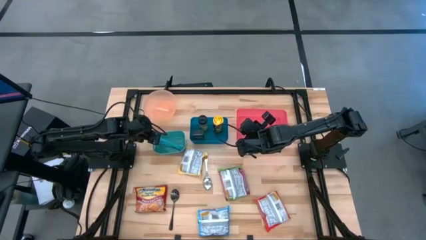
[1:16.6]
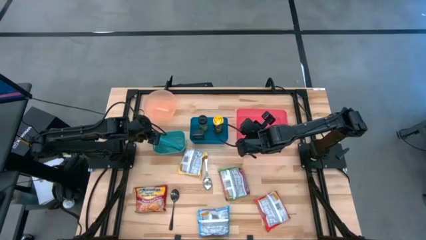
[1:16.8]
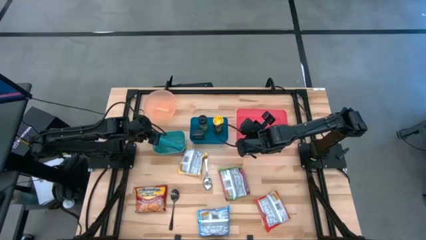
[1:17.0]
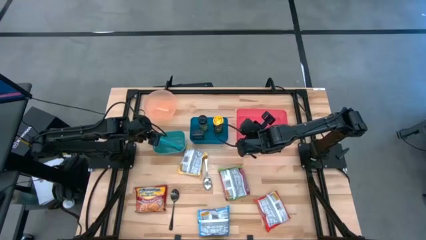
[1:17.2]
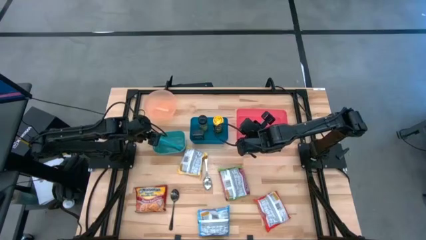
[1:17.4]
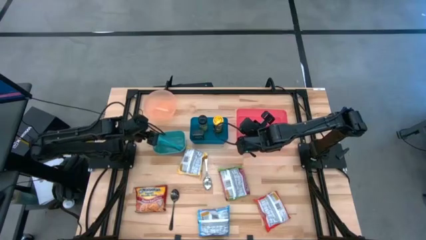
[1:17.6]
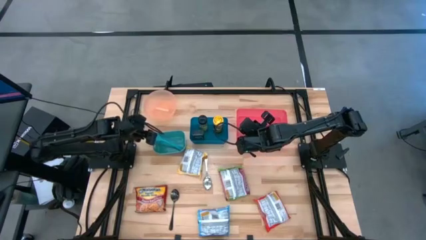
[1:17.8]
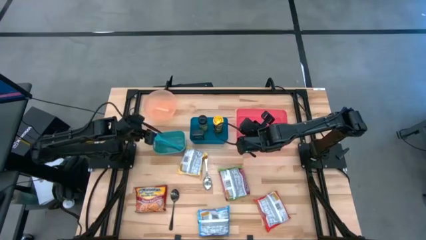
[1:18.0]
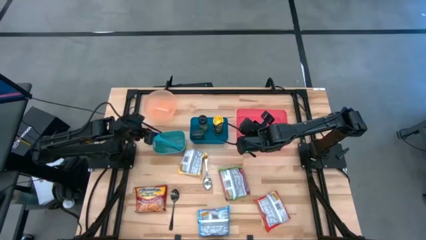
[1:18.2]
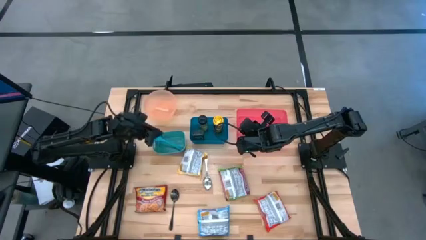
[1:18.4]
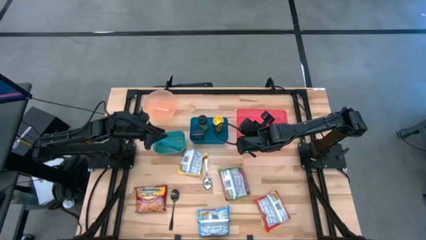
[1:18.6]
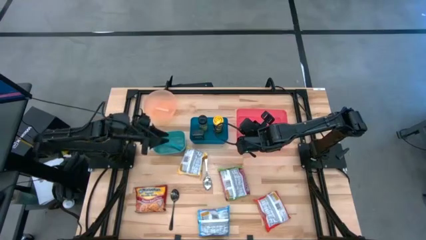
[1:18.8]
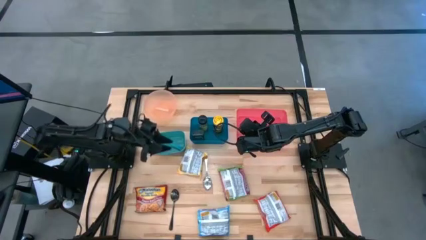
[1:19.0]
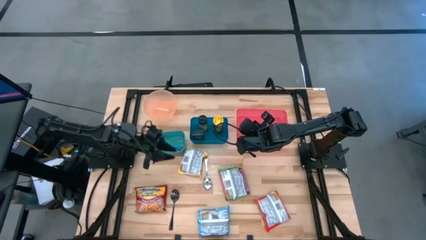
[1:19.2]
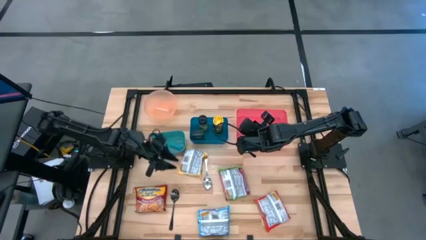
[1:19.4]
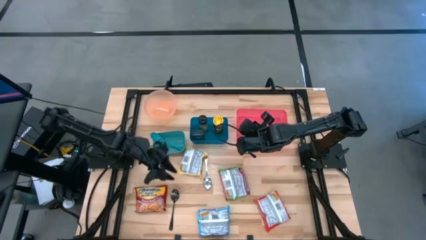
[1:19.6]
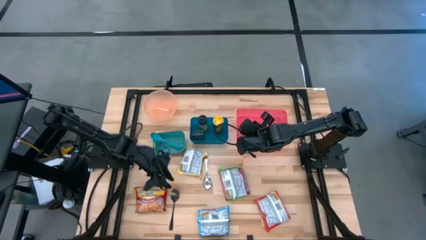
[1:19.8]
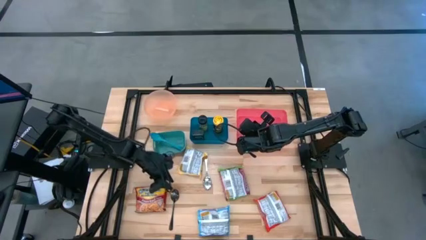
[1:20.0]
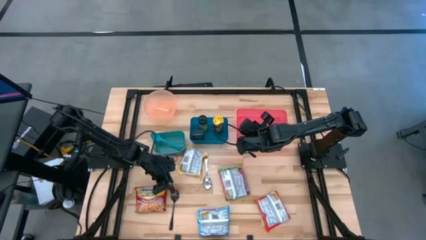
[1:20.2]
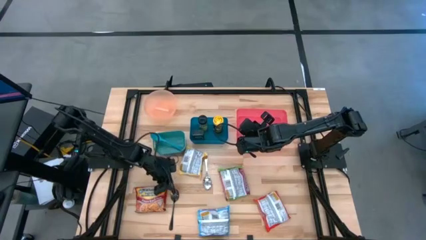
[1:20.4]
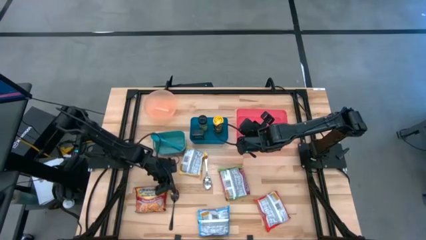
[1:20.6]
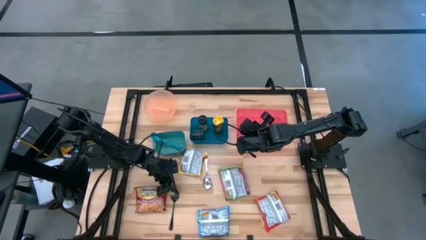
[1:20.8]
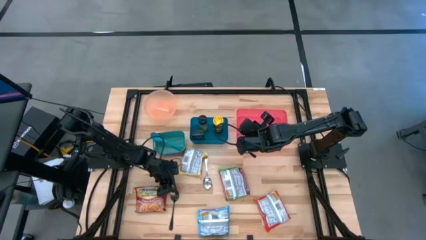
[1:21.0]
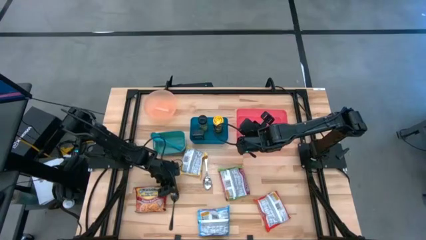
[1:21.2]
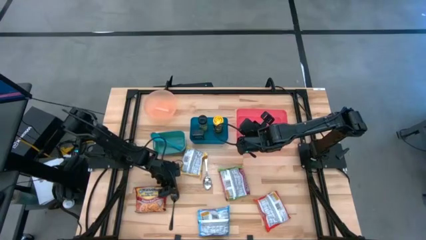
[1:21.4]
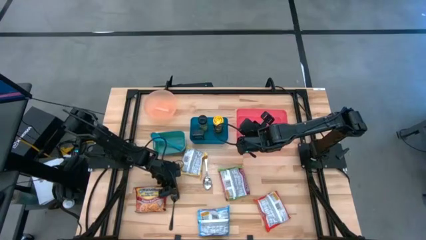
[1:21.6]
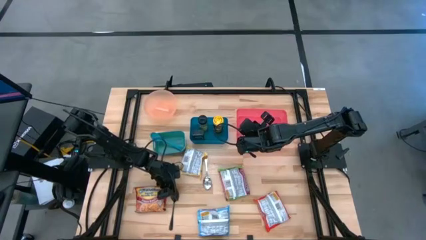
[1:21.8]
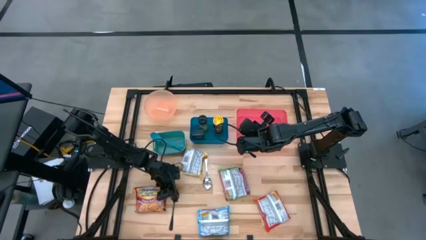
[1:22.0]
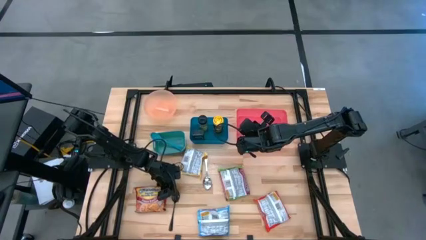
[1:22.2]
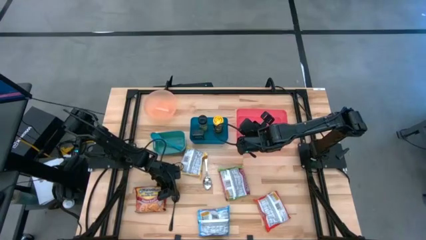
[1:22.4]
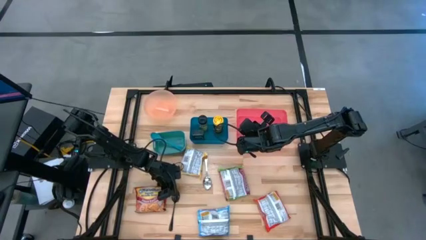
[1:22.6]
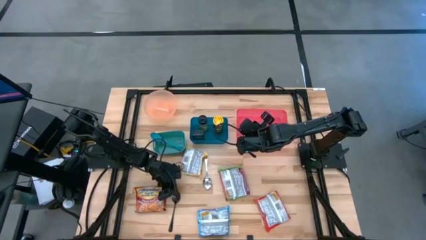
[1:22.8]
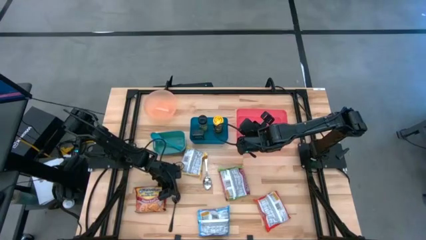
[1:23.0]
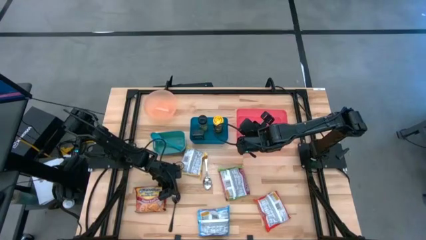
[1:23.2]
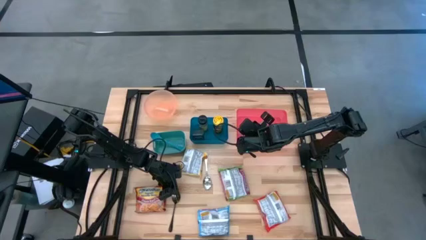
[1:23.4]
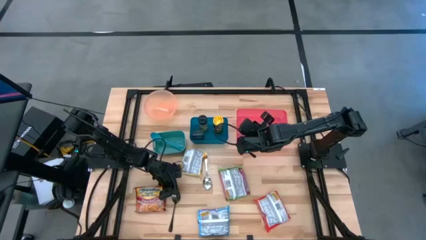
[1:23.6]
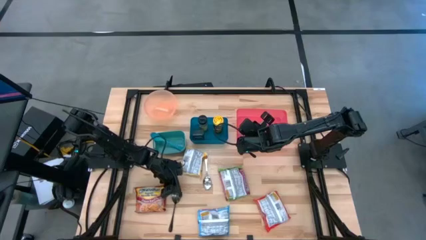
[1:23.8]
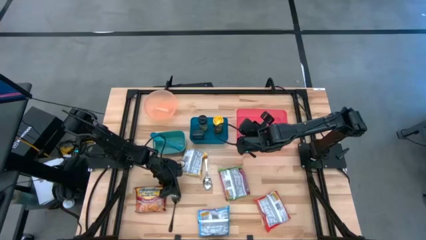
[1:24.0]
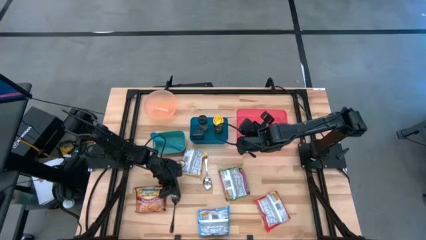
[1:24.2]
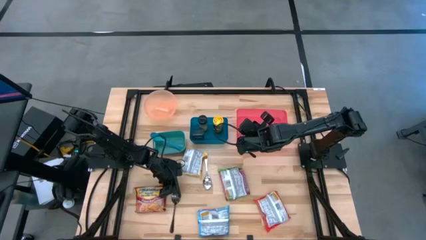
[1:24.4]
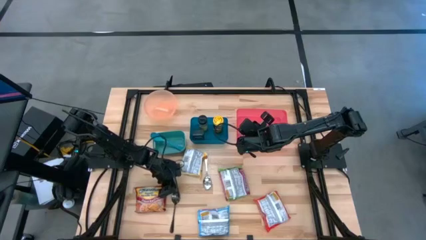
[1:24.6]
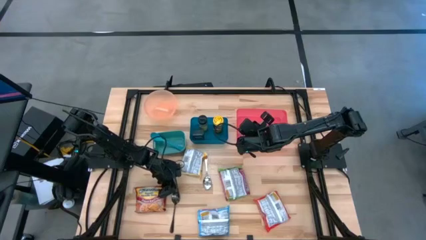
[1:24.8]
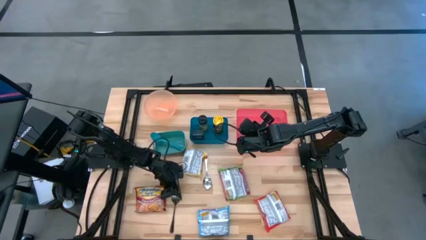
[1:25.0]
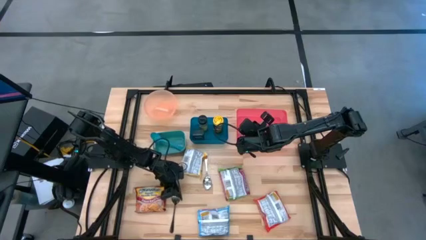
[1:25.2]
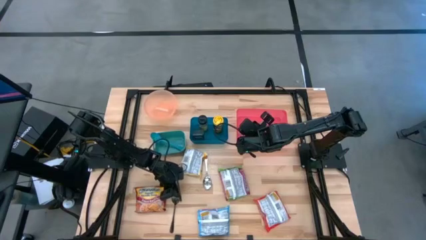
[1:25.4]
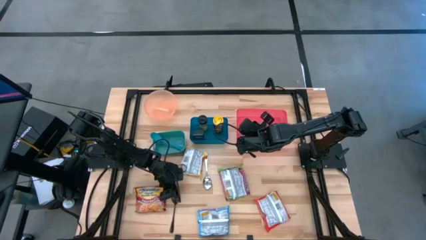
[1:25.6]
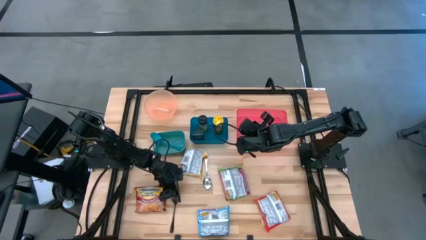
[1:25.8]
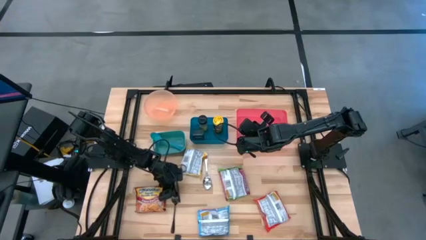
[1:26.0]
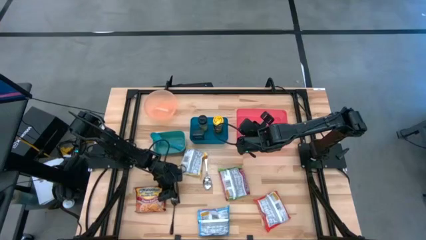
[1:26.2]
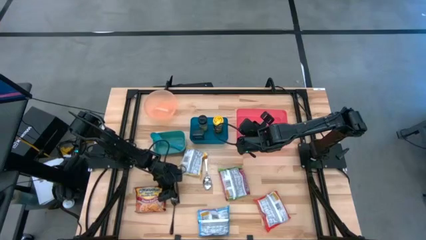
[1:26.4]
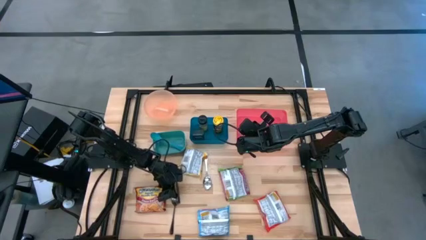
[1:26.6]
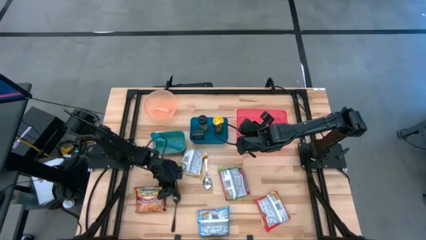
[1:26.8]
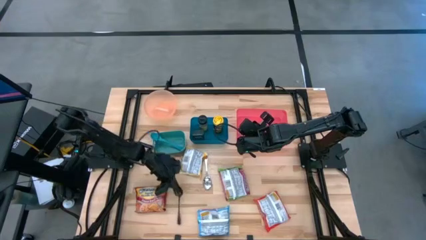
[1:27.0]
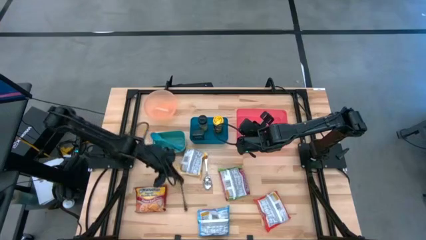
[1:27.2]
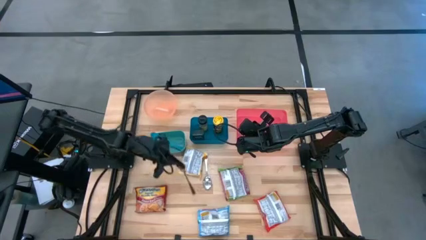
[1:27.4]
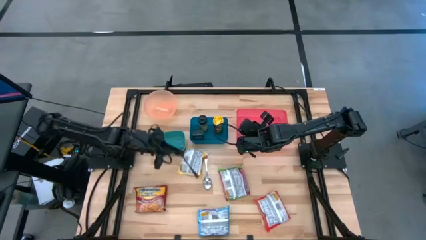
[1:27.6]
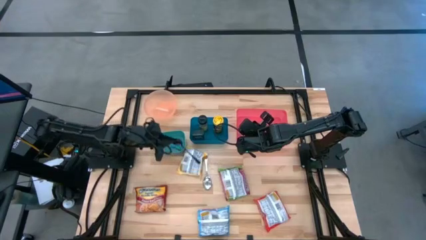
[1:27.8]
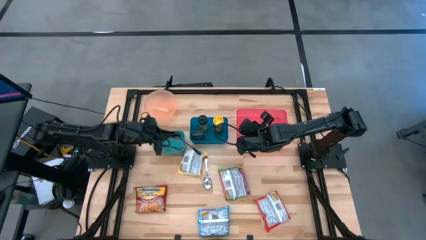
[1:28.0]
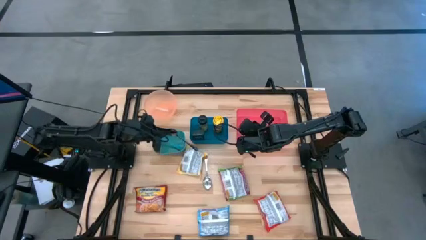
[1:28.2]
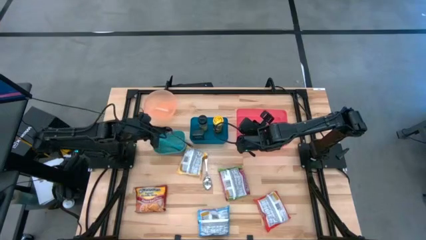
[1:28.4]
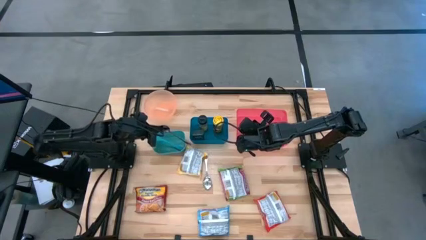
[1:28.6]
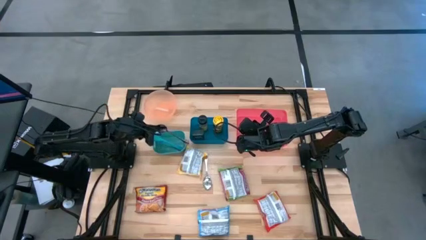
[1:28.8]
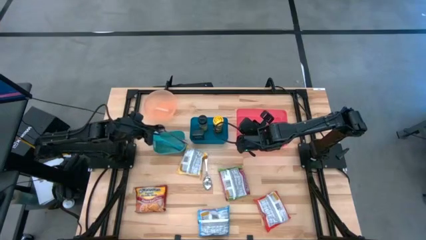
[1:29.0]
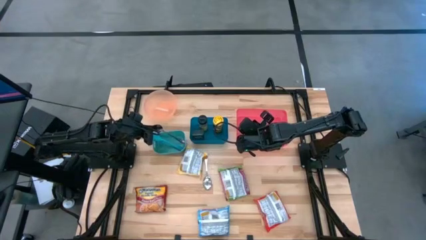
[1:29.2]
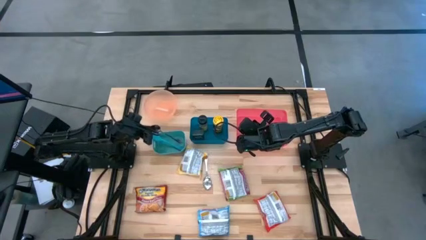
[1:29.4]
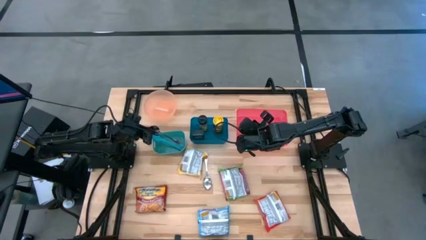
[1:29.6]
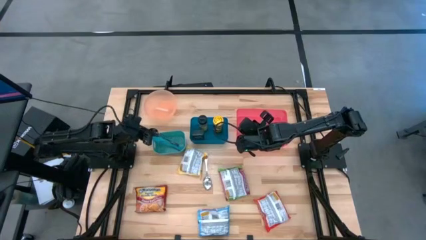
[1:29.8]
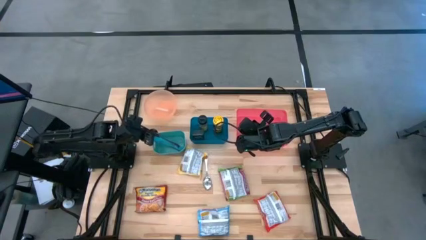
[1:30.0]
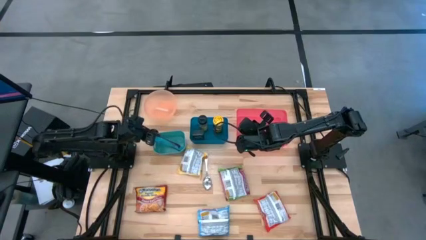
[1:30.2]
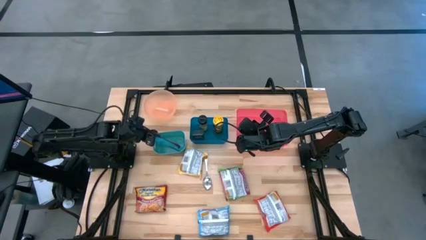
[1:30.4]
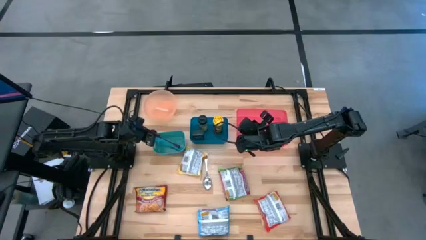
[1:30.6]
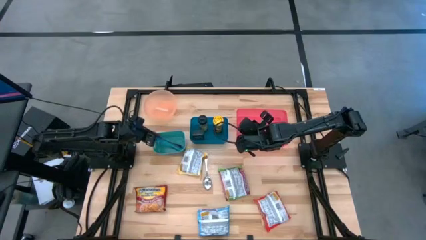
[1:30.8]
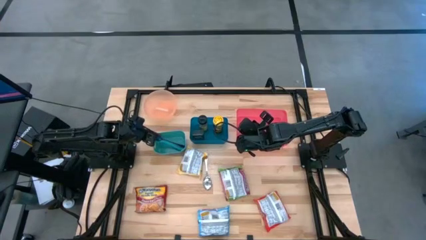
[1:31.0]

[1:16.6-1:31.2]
Task: Pick & Place Food Item
Put the black spoon into the green bin

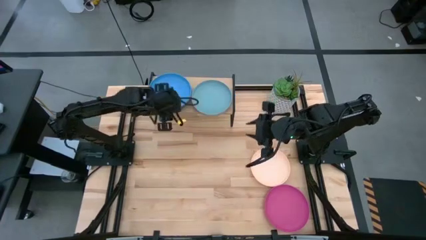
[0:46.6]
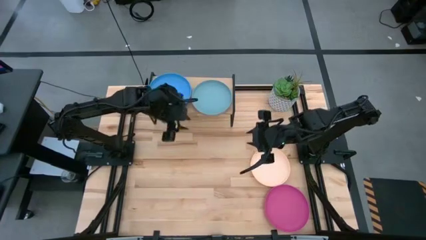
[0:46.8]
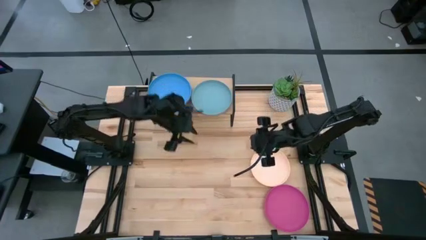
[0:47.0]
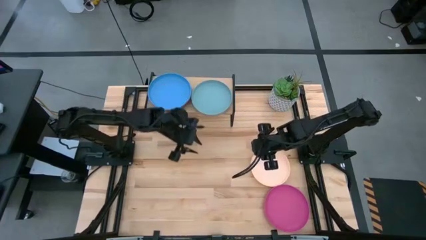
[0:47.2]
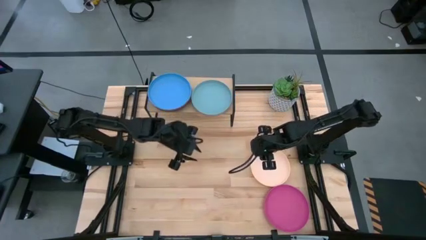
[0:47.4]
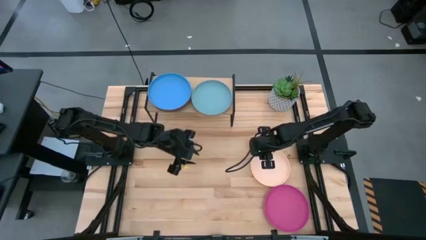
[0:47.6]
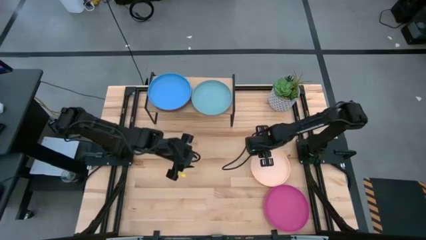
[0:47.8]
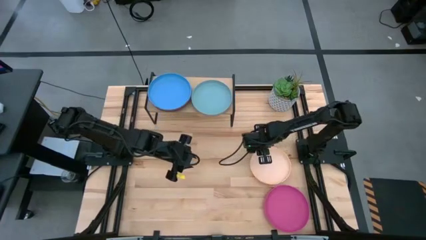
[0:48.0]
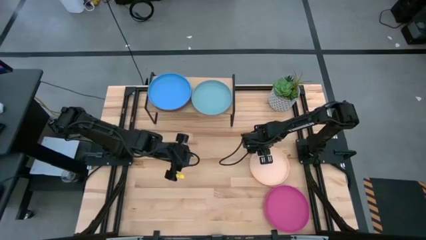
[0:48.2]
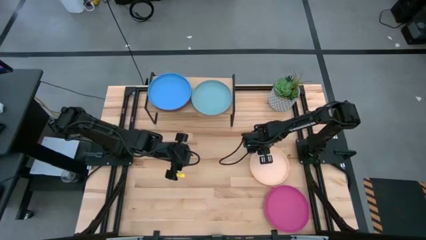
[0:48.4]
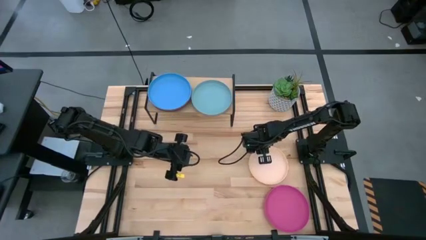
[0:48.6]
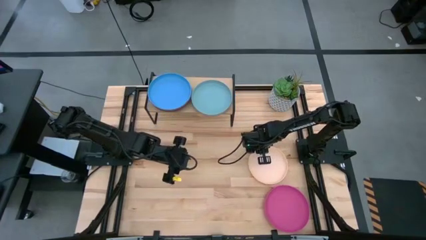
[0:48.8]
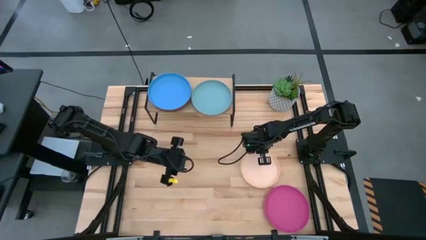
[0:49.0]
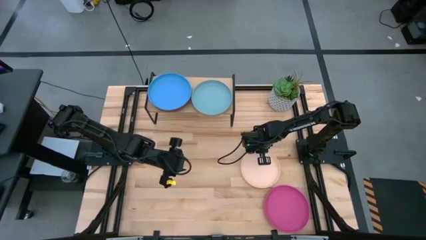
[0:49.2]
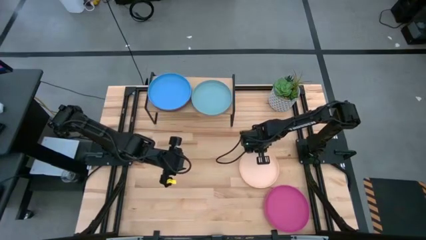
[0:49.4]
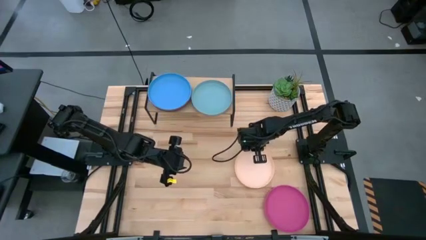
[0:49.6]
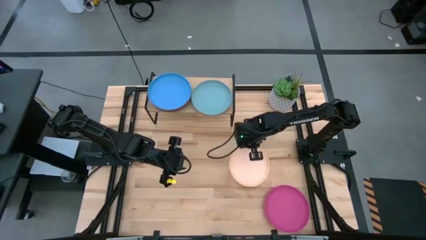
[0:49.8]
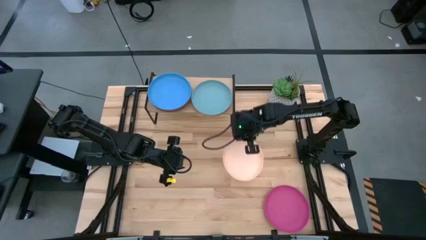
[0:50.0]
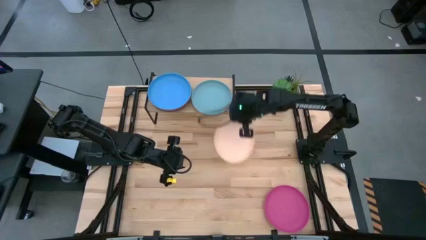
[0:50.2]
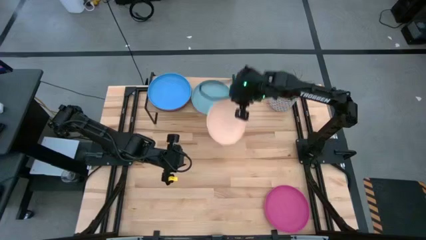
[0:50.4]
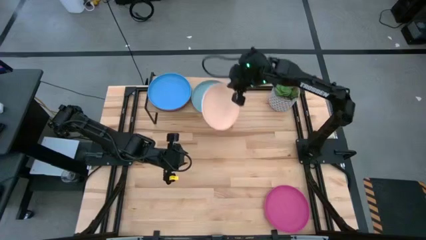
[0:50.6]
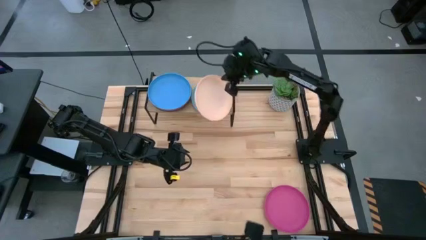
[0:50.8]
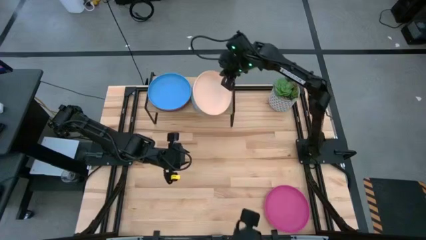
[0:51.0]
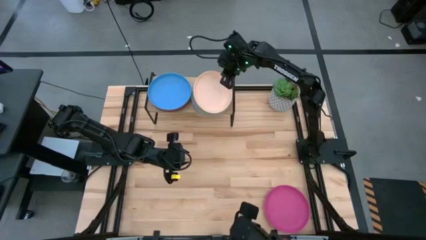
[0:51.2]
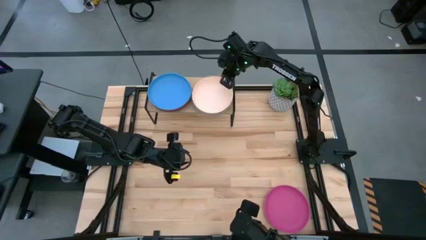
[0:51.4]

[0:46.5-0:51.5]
Task: Place and stack plates onto a shelf
Stack the light orange plate on top of the light blue plate on the shelf
